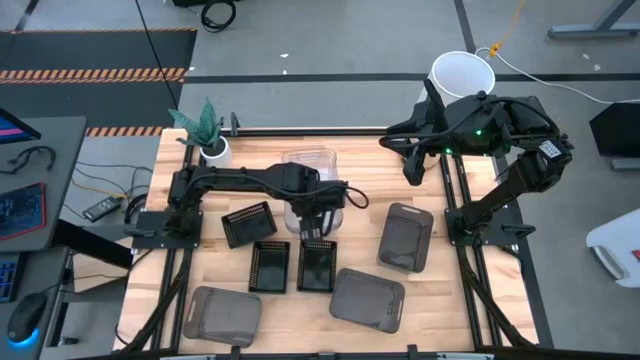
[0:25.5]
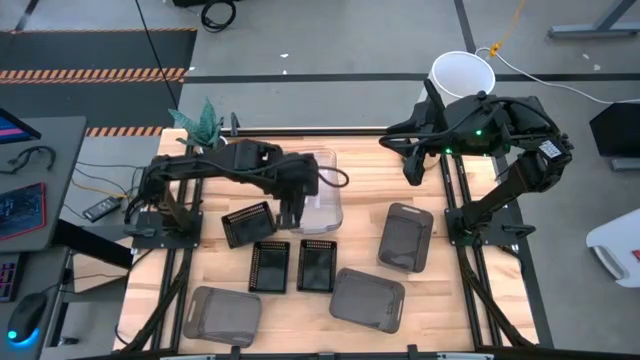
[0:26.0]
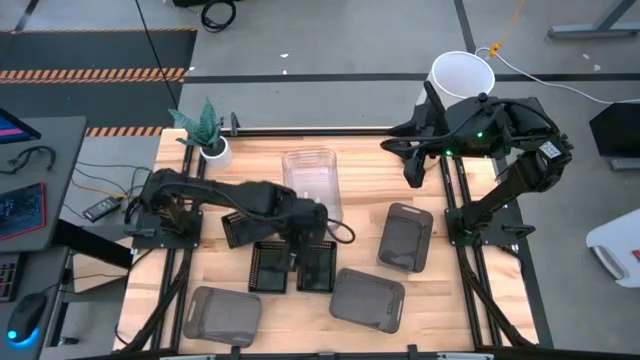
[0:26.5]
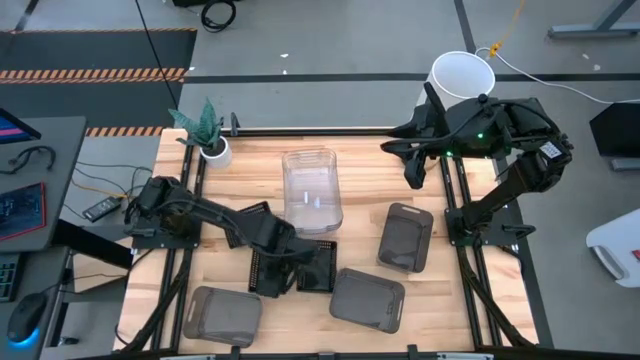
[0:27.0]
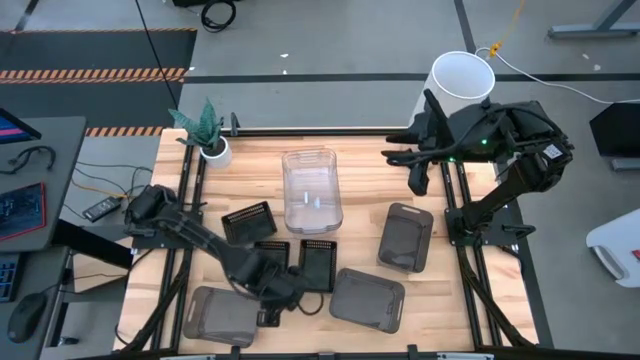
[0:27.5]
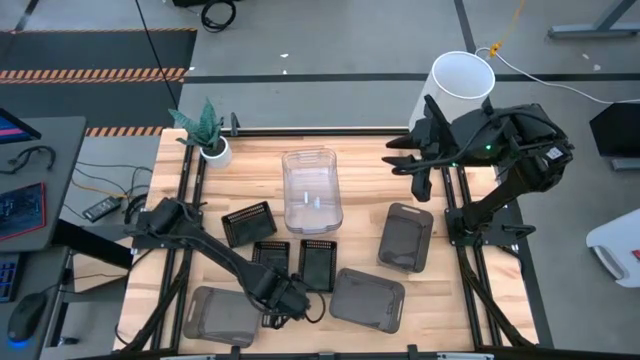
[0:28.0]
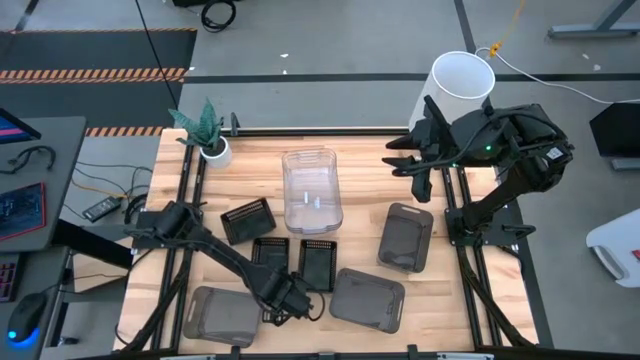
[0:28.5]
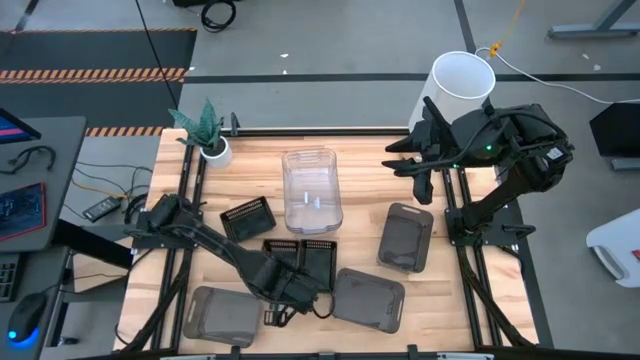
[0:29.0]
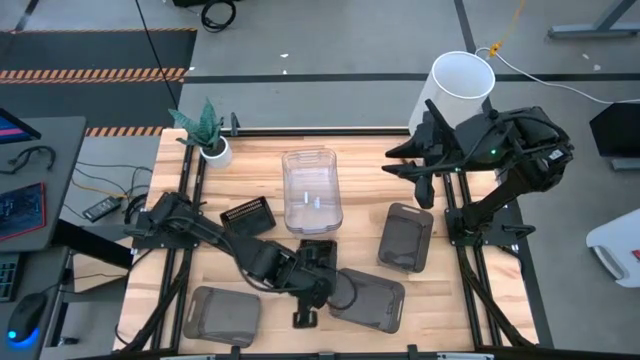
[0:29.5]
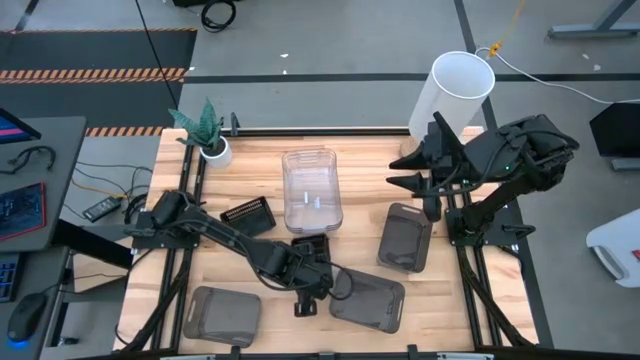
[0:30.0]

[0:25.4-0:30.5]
Stack the middle black bin on the middle black bin

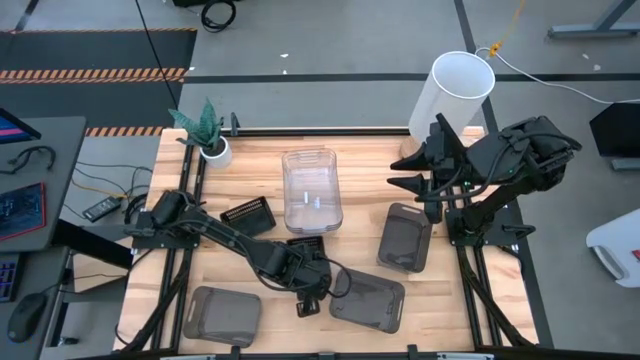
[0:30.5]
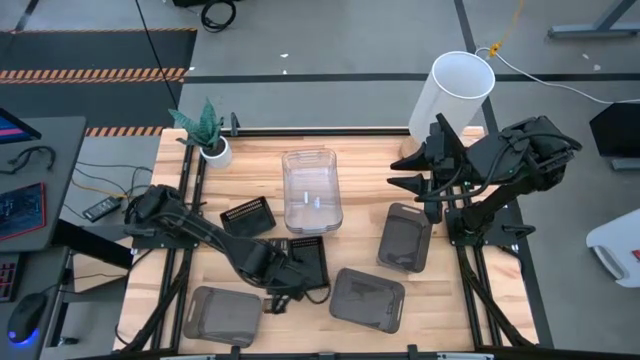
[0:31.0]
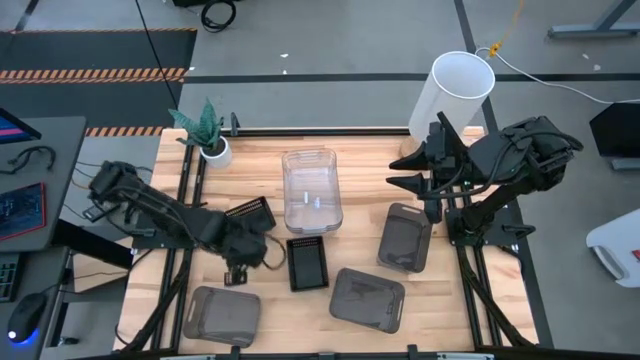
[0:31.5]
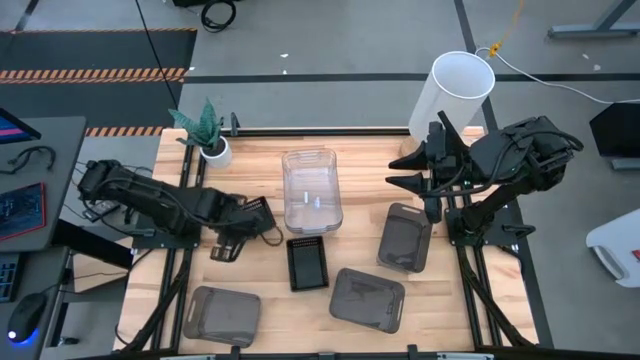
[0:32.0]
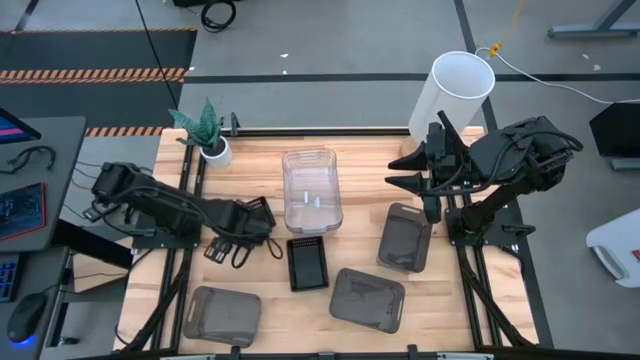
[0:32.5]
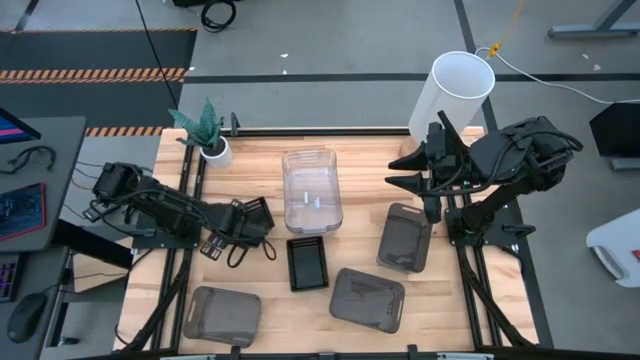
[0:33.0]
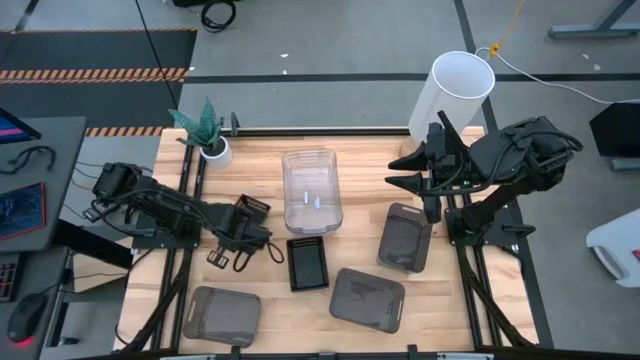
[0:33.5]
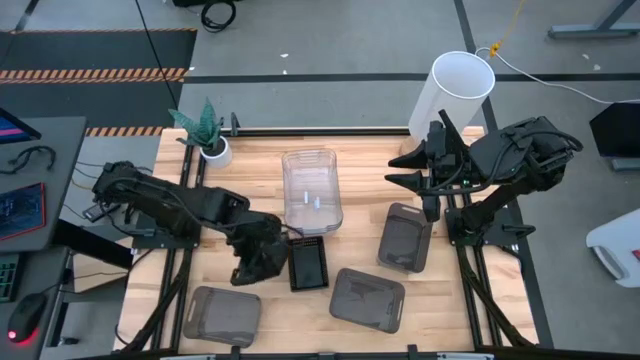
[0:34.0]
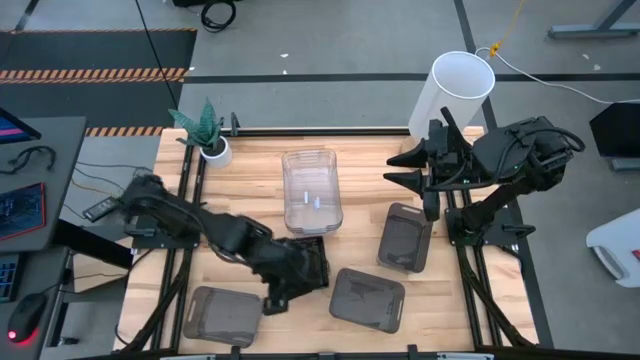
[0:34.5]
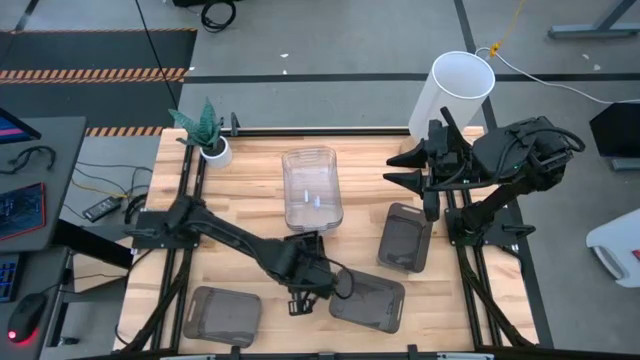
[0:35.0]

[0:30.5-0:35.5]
Stack the left black bin on the black bins

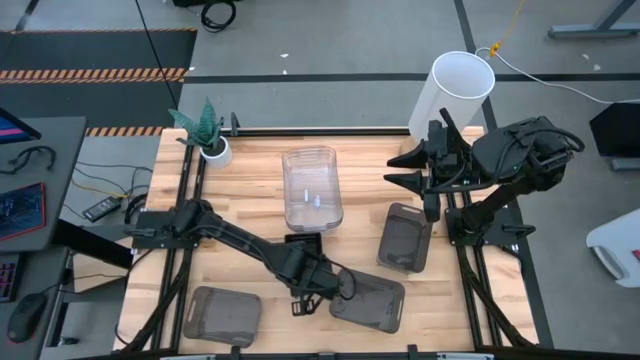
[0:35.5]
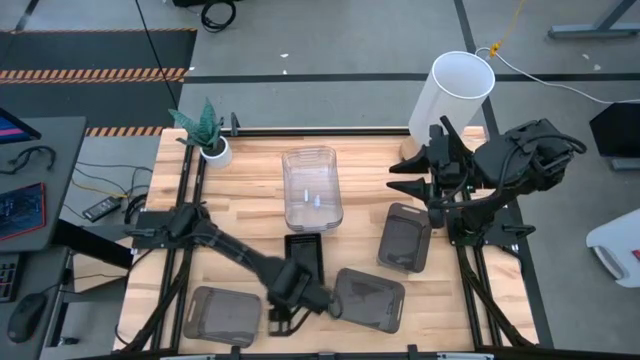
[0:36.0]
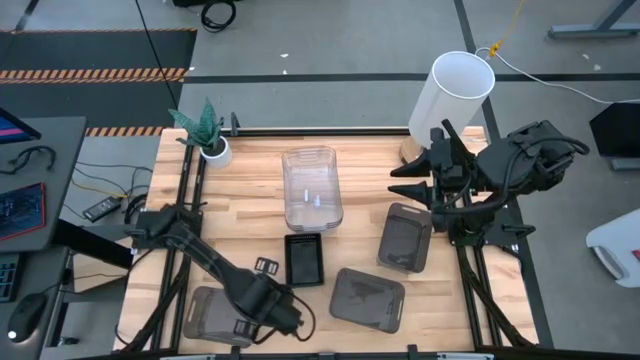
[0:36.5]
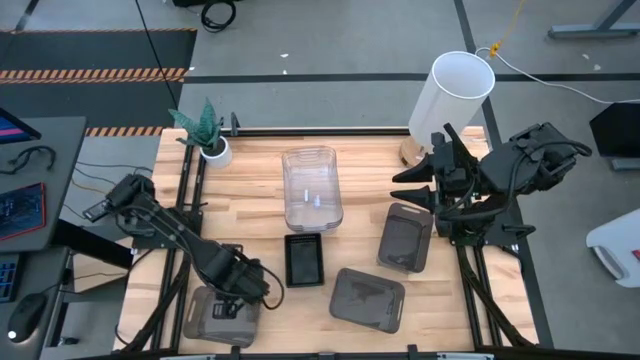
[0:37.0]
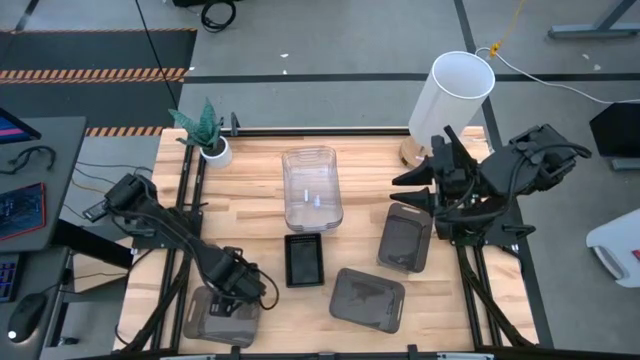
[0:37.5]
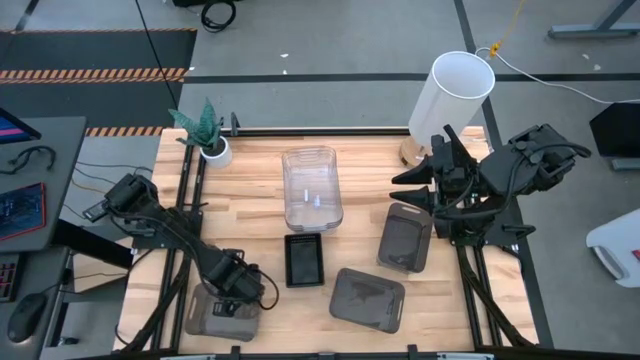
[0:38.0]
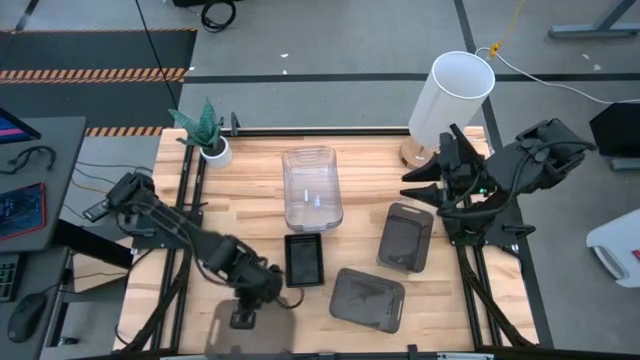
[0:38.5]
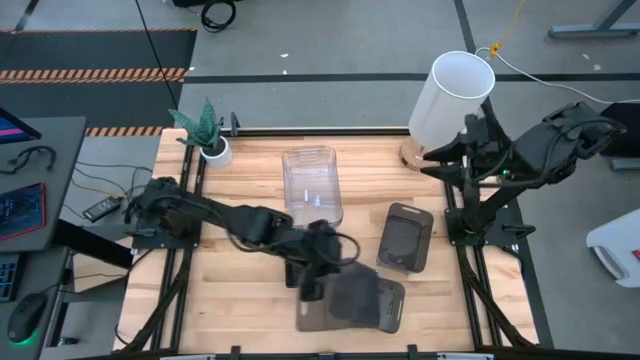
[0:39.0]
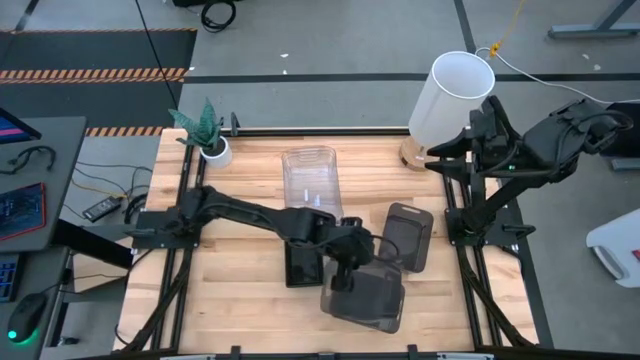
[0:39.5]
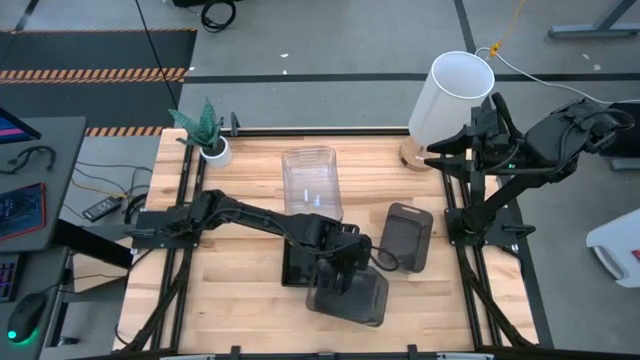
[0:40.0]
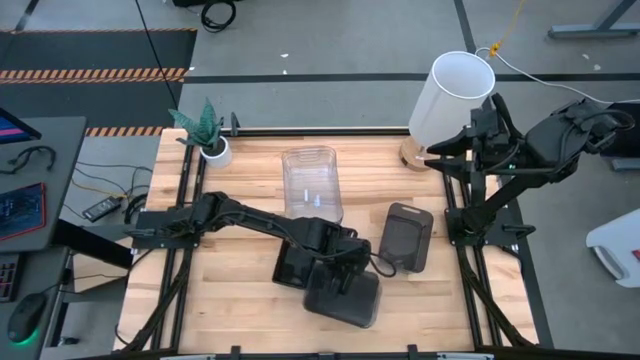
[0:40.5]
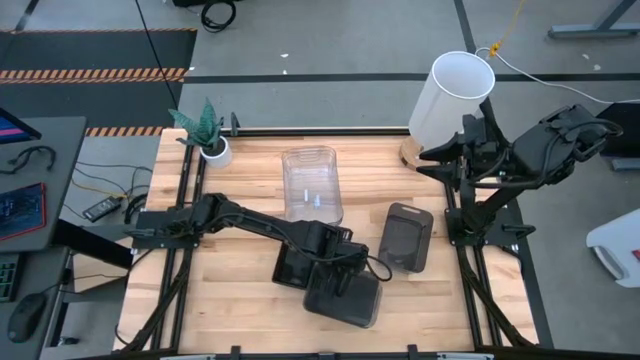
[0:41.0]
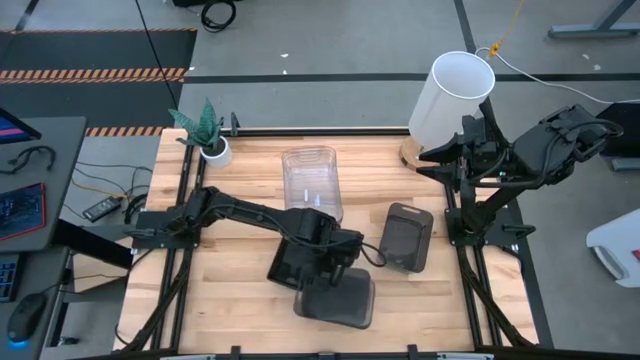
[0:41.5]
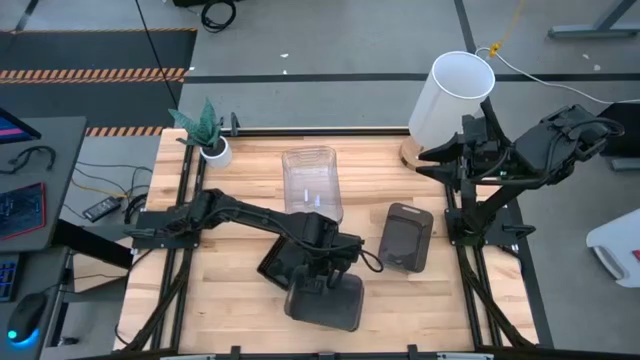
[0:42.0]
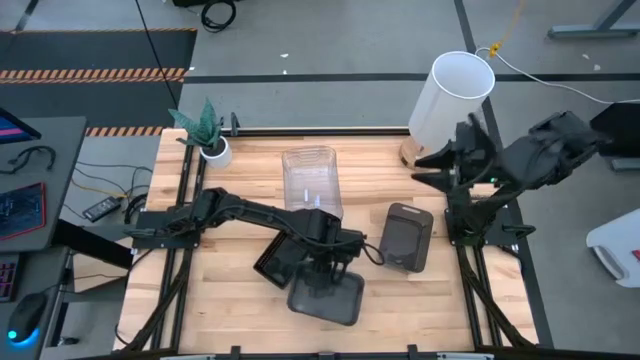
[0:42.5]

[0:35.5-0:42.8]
Stack the left black bin on the middle black bin

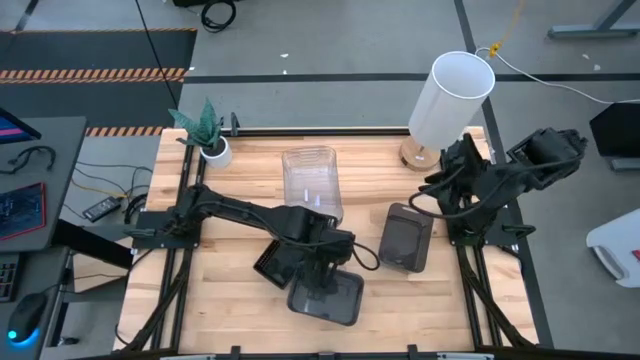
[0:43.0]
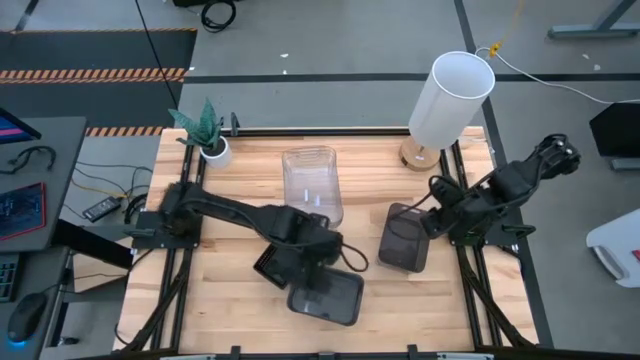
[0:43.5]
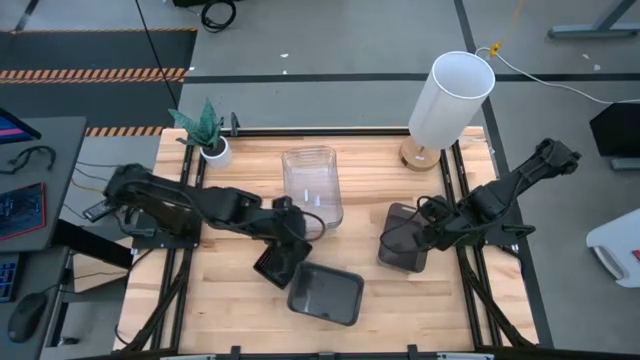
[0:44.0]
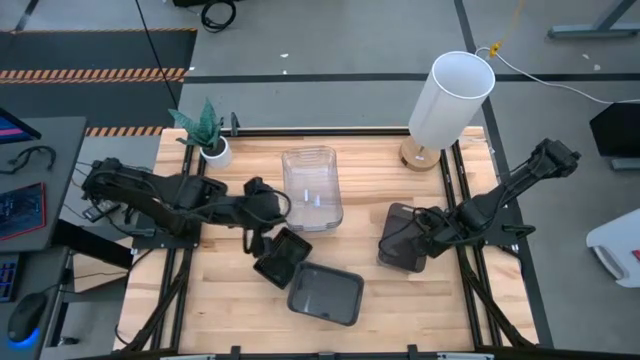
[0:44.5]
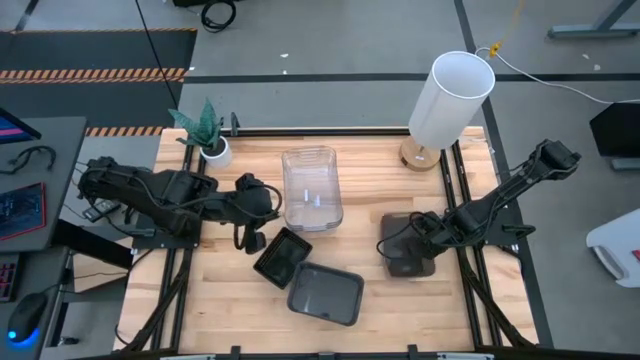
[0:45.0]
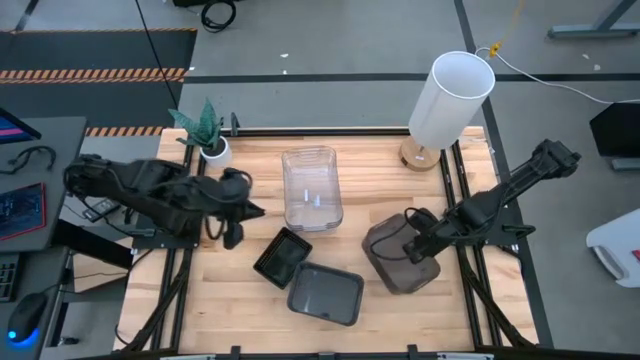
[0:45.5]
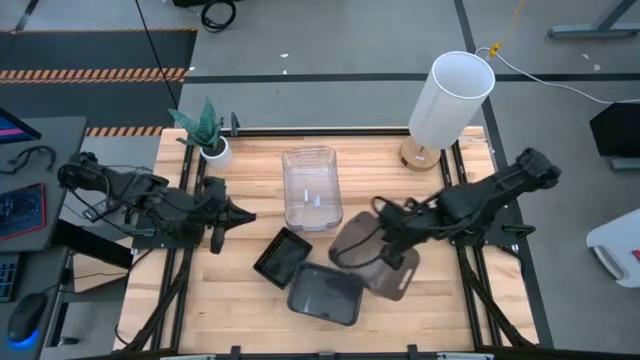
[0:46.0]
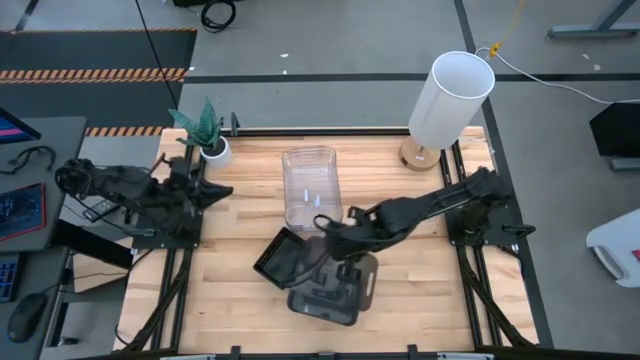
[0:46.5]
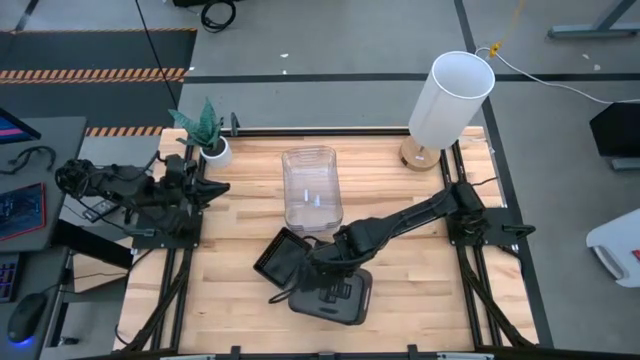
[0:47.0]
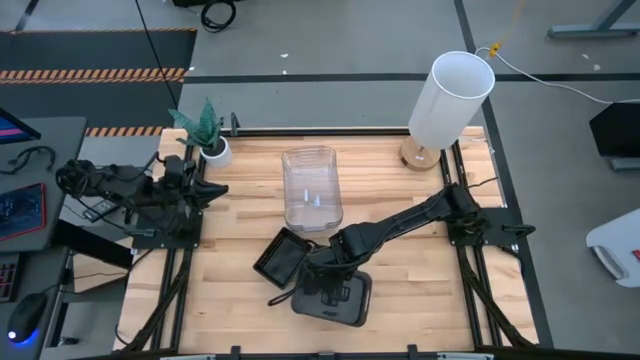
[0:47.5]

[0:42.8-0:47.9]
Stack the right black bin on the black bins on the table
